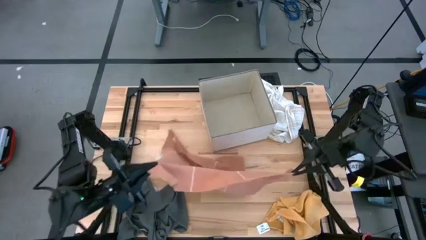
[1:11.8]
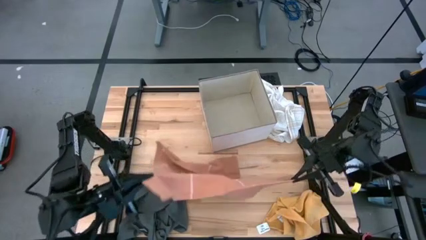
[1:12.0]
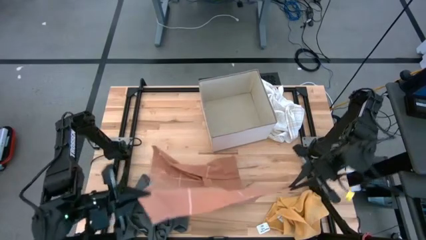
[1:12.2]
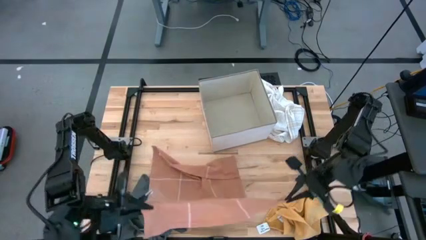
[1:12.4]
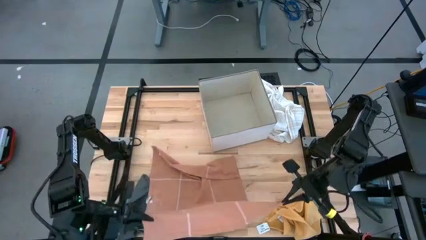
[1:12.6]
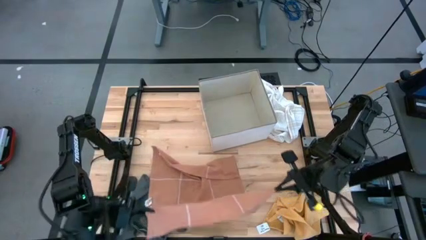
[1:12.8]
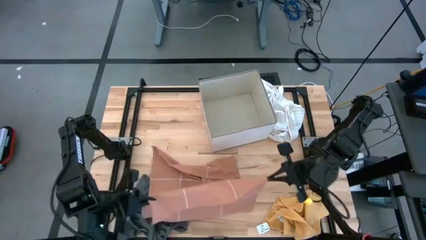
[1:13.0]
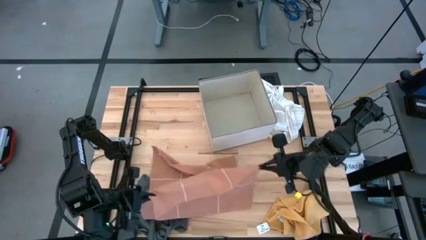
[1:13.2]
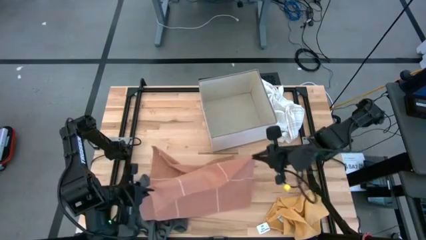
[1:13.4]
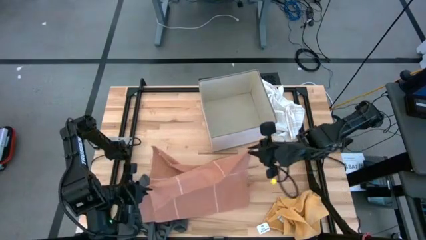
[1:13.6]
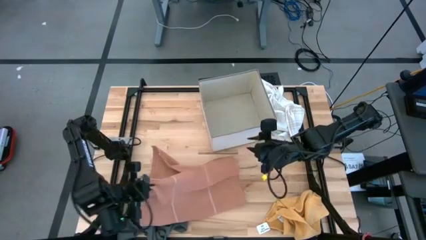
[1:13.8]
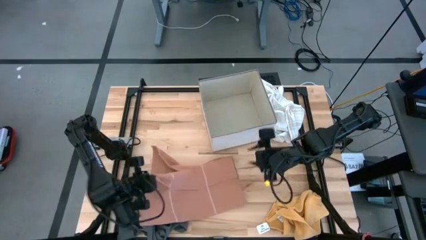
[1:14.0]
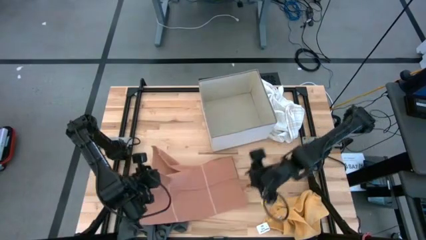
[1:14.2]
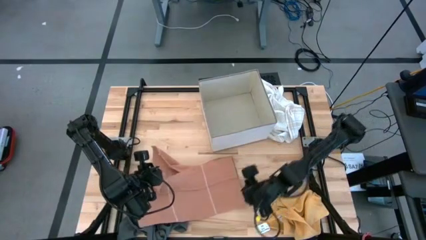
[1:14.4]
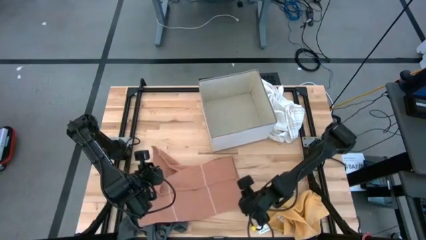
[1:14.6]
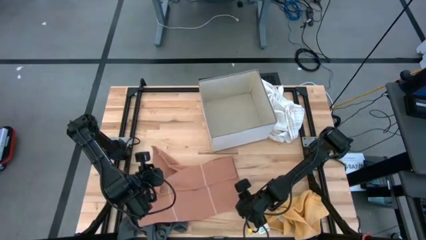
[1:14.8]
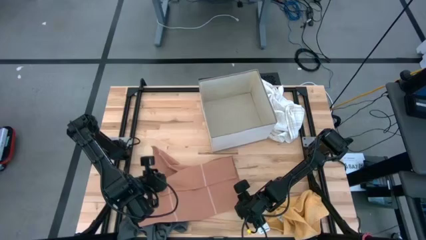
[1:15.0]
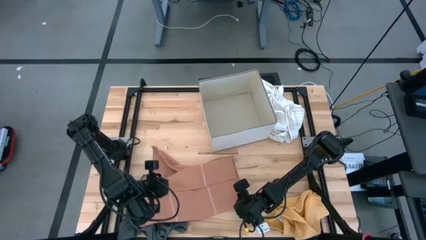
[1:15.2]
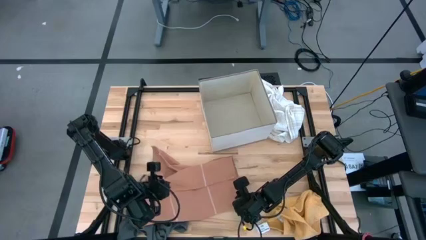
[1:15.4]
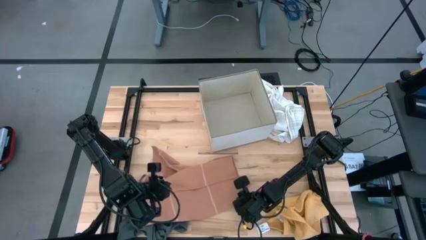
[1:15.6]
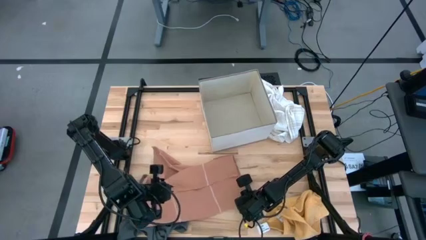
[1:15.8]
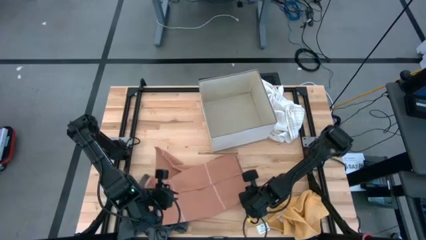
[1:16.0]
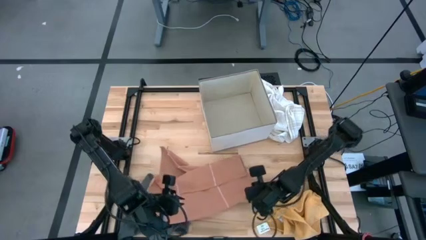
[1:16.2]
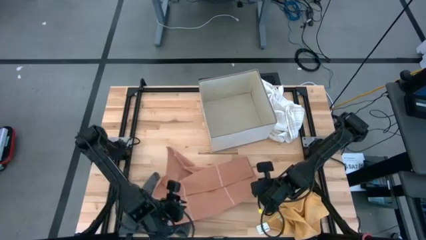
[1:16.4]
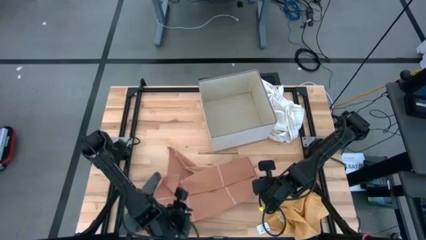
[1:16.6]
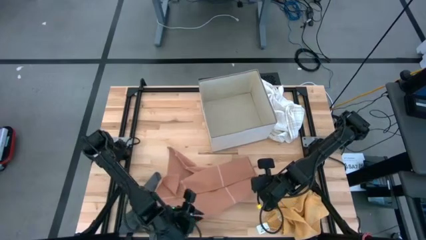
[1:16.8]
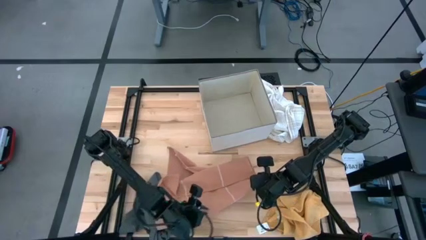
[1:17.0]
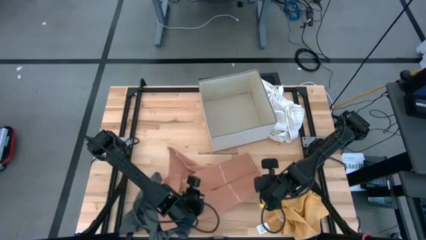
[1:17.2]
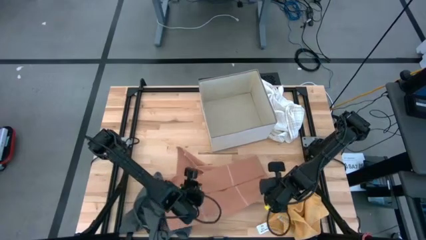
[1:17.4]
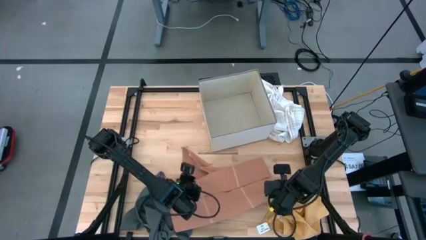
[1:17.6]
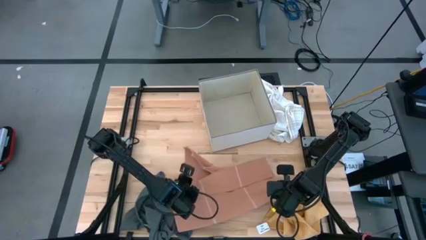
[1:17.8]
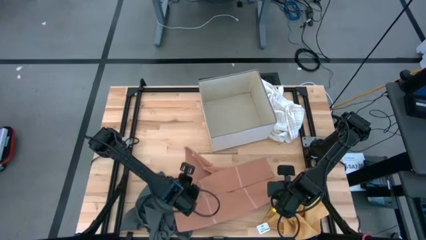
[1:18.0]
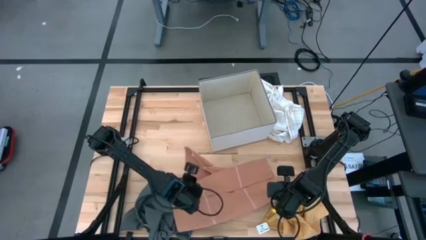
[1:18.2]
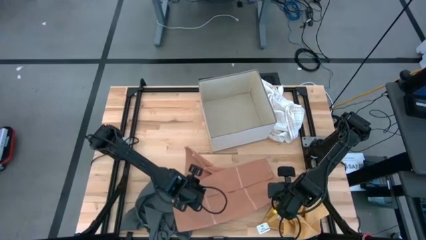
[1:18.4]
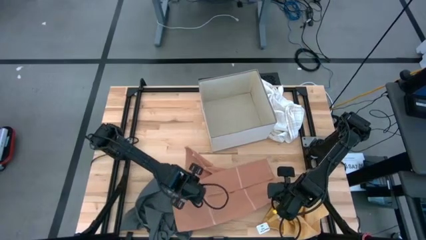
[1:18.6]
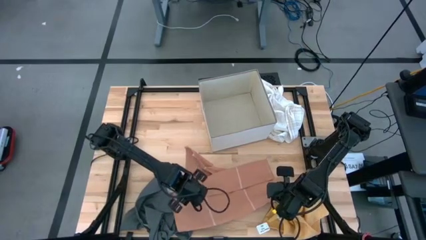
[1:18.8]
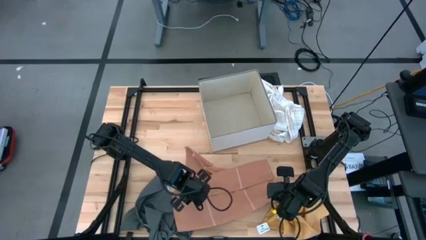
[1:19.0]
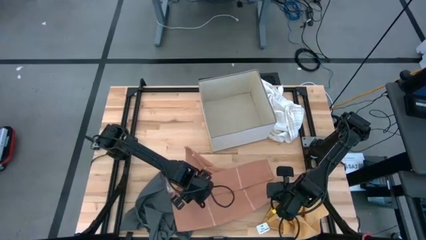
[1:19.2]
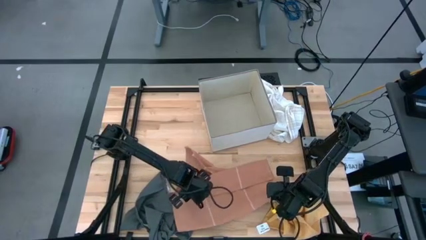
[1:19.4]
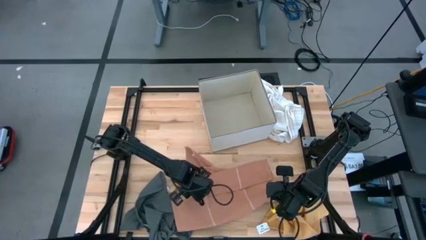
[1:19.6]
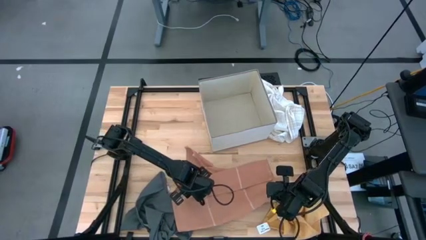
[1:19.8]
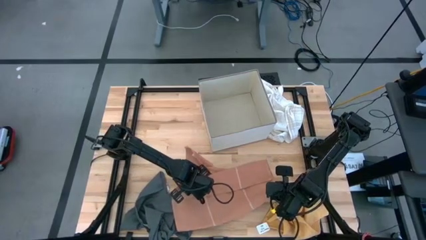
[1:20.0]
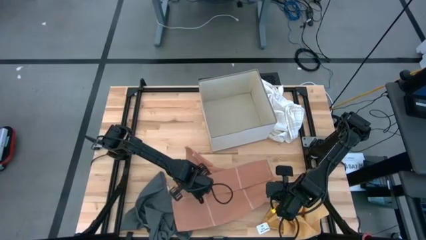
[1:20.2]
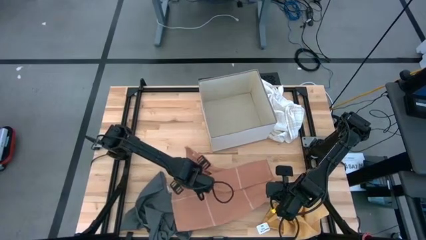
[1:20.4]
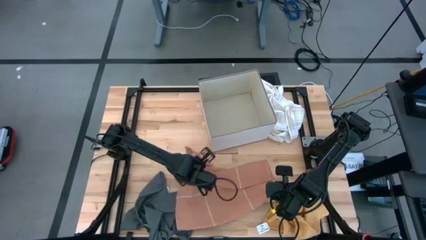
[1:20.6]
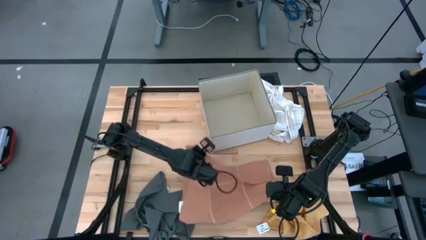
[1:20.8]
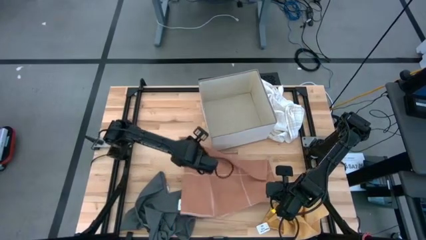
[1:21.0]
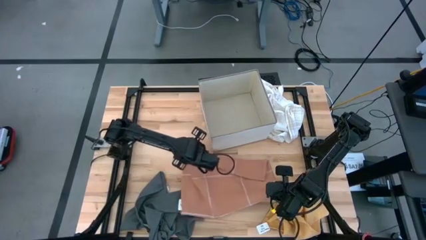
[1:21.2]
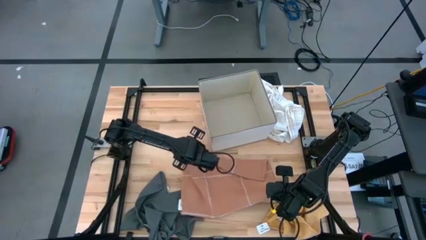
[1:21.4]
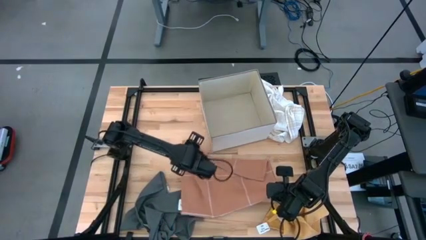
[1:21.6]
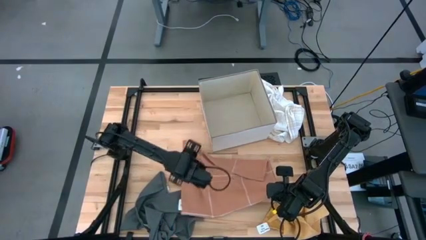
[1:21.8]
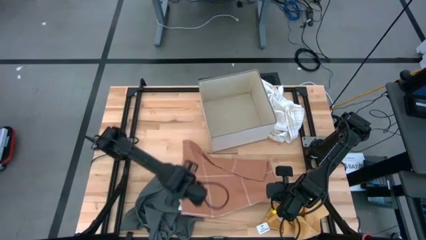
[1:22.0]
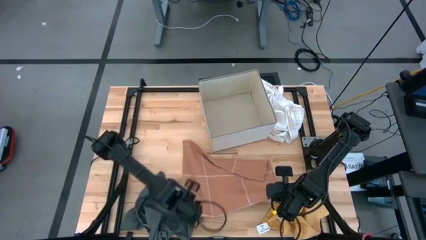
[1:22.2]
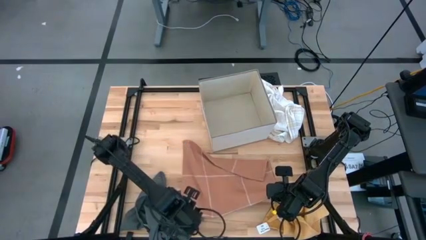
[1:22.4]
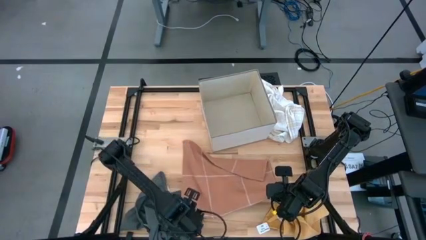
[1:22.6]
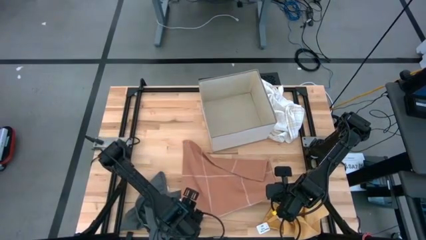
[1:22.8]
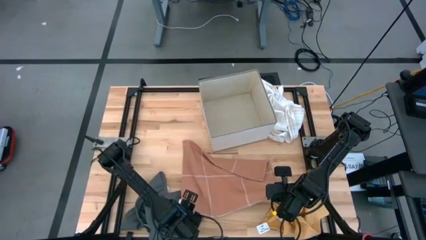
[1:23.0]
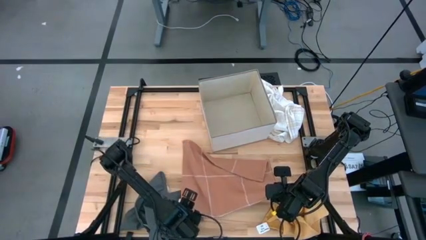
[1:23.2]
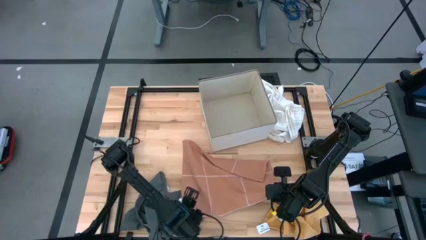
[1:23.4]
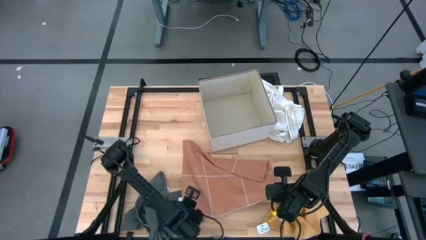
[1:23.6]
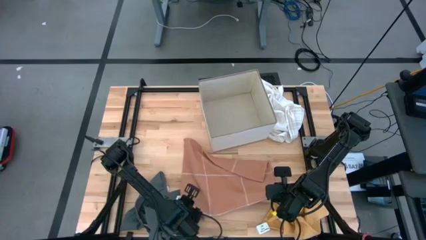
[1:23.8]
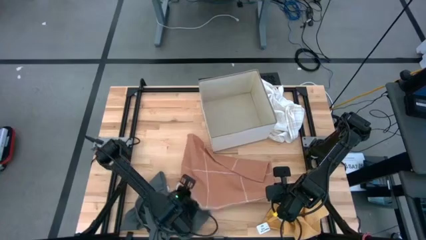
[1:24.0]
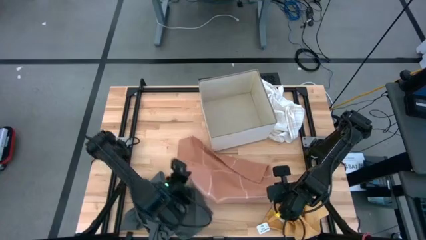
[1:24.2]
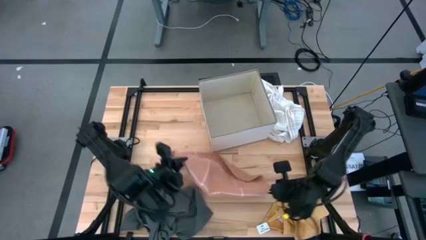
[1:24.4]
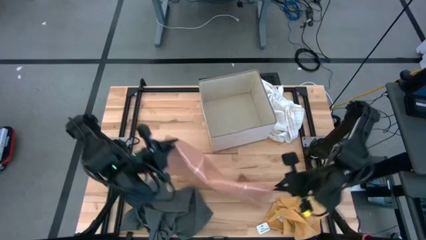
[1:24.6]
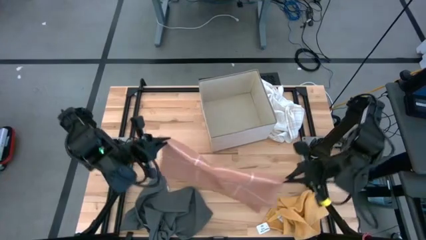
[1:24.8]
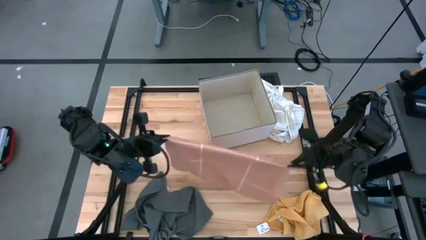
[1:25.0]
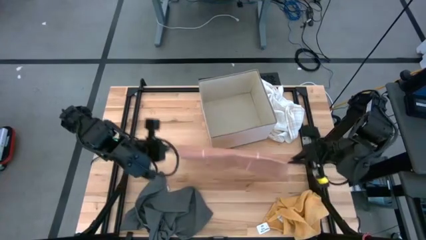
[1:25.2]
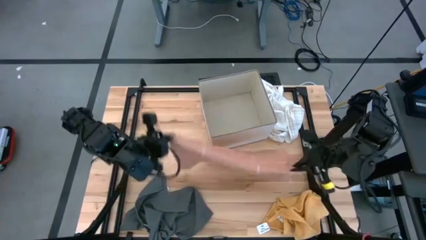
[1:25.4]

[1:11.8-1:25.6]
Task: Fold towel
Fold the brown towel
